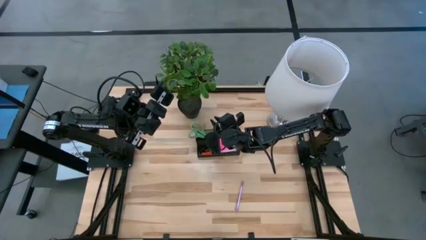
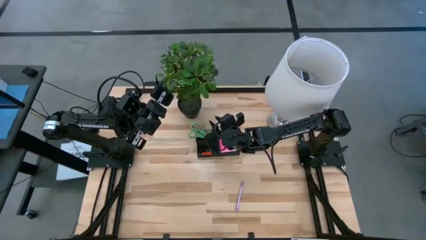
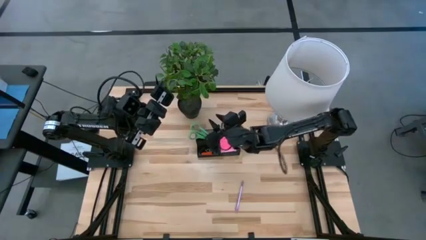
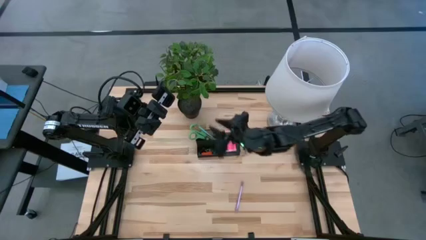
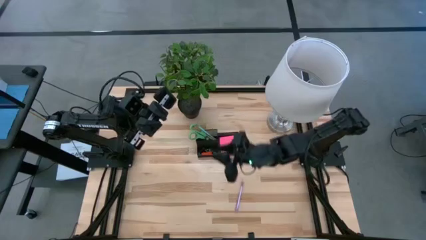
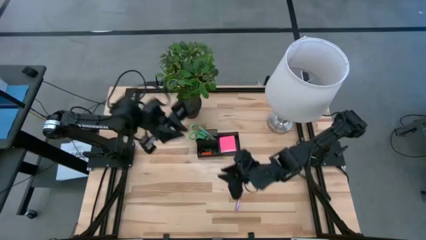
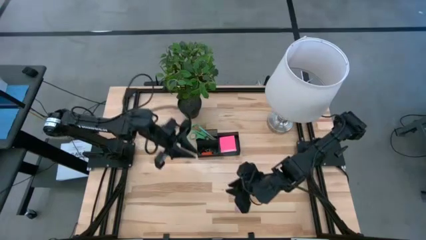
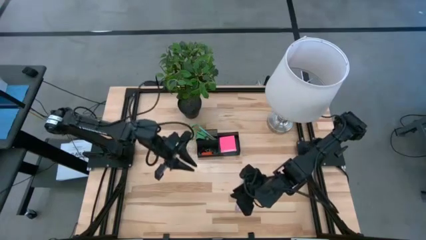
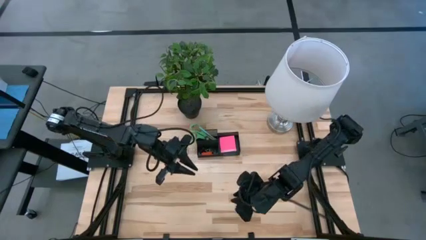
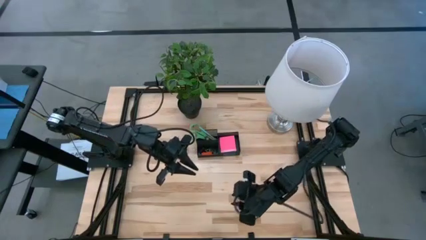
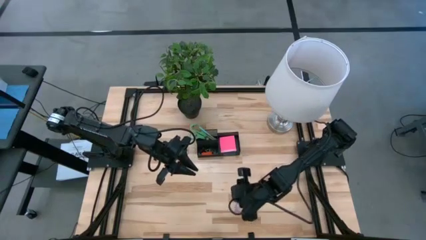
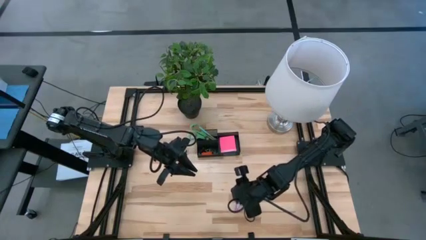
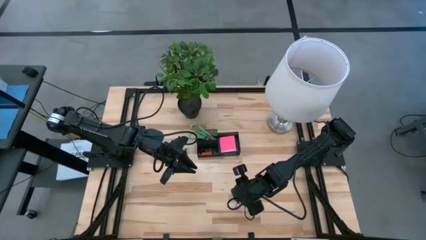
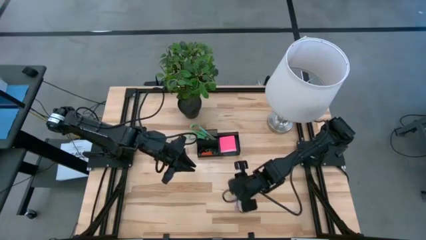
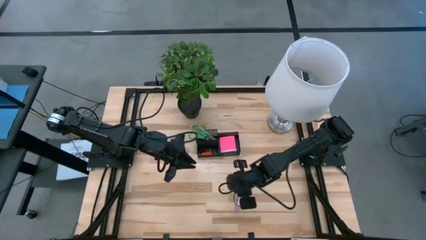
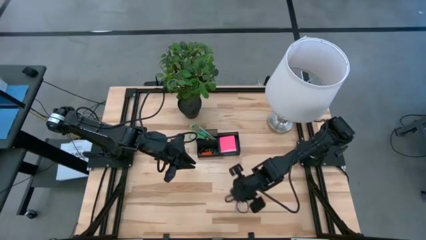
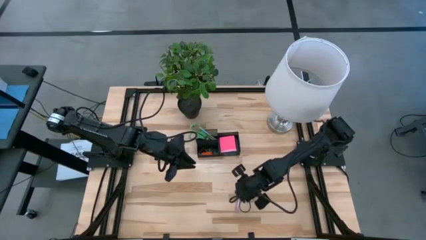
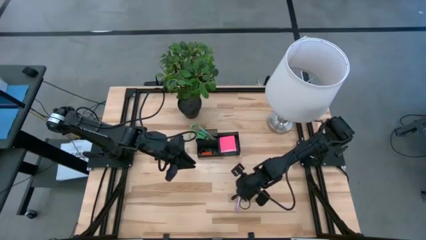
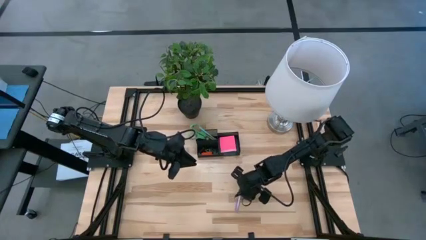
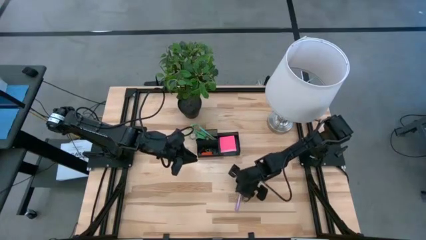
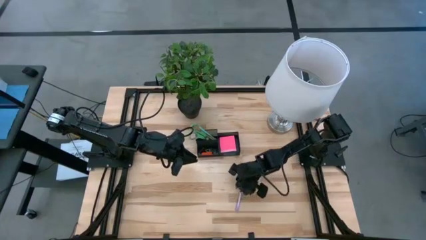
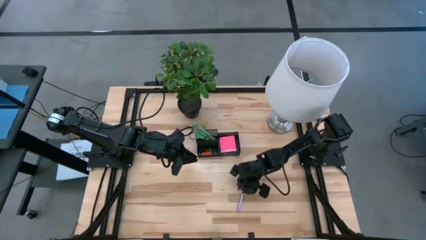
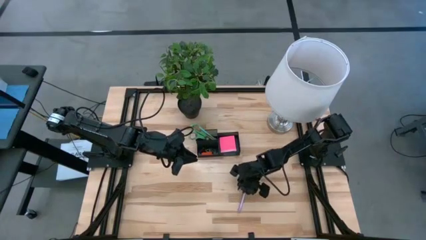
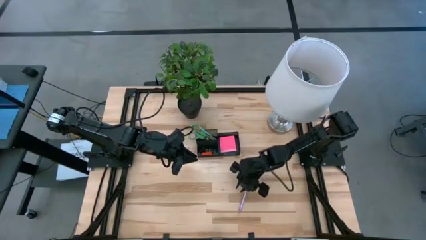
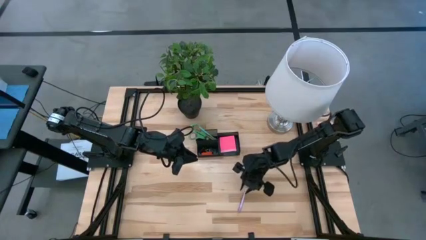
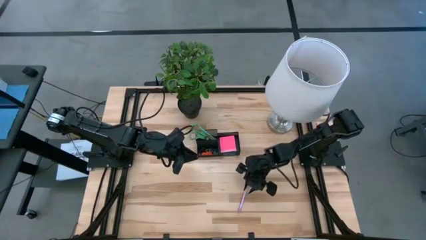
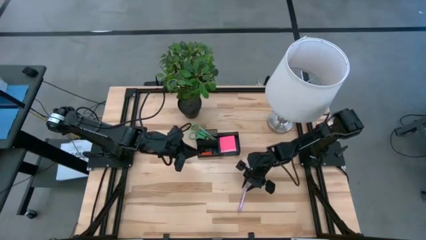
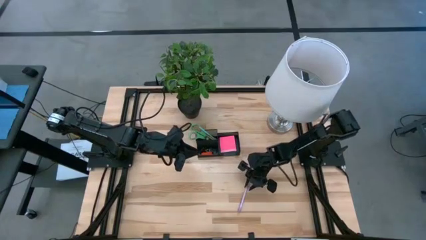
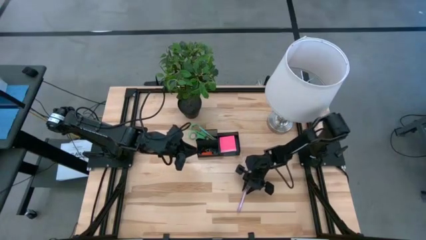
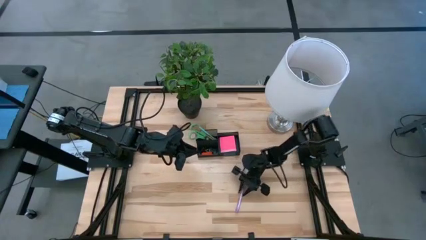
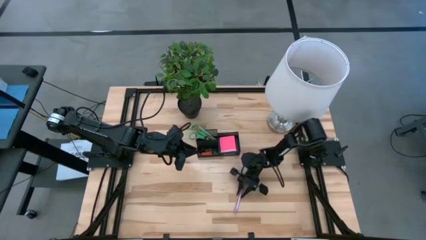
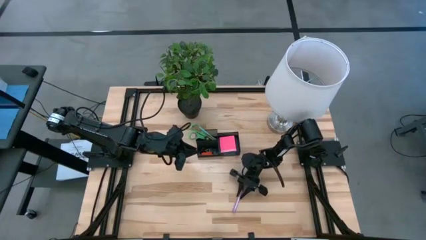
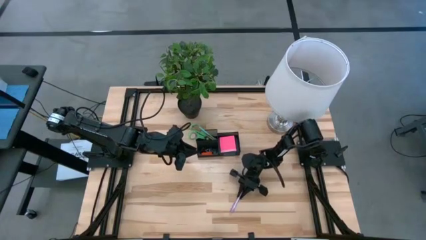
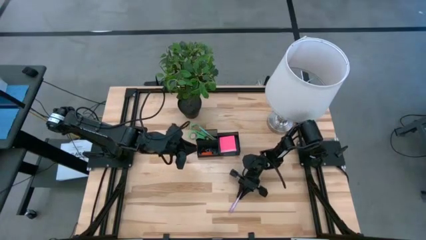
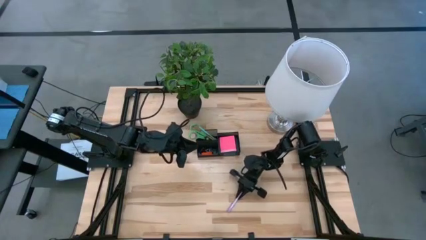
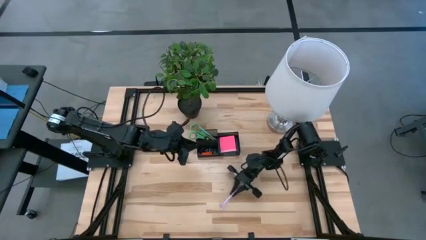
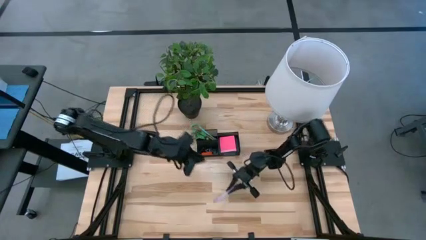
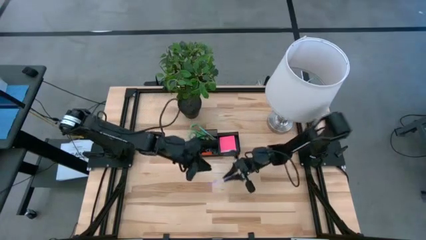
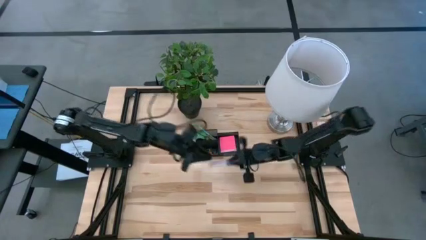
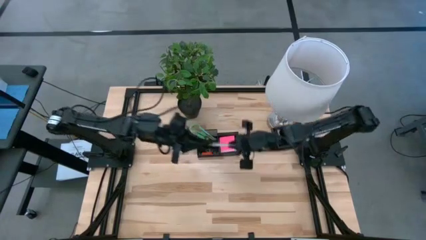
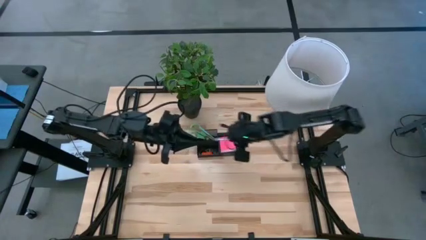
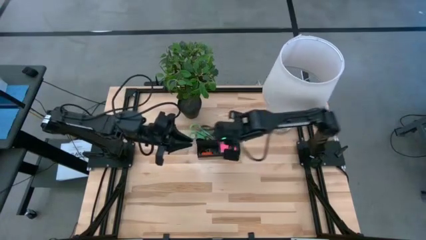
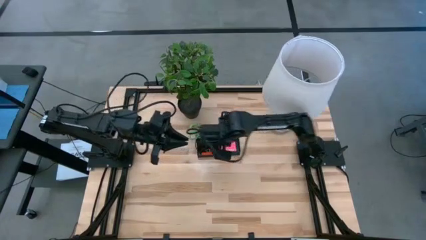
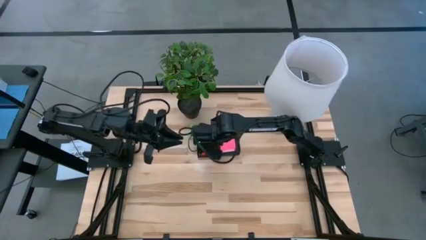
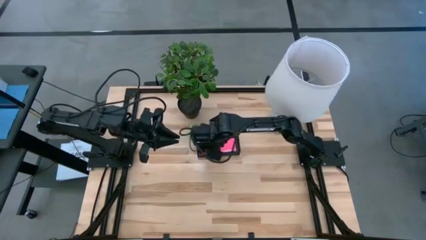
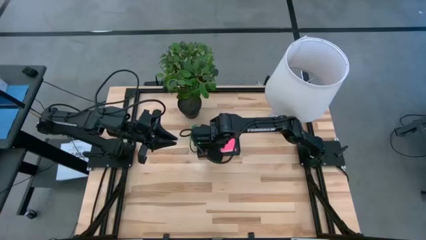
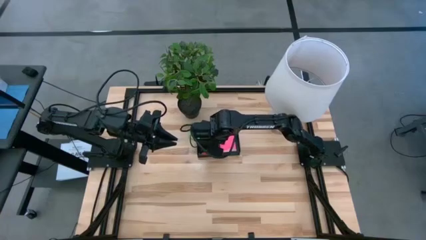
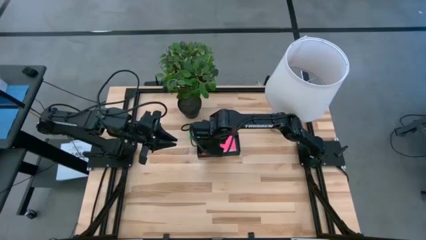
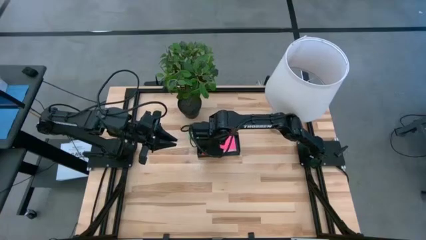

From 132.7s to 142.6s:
Task: Pick and place office supplies into organizer
Put the purple pen into the black desk organizer

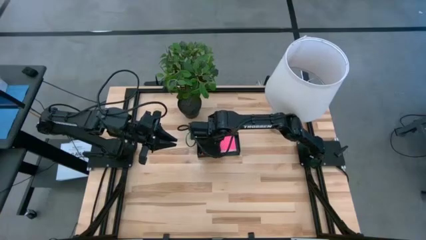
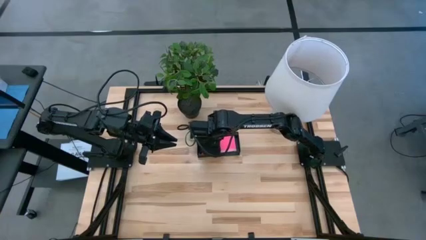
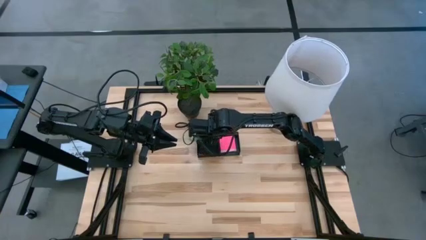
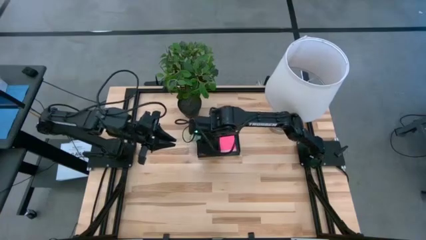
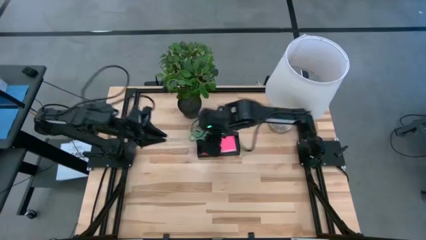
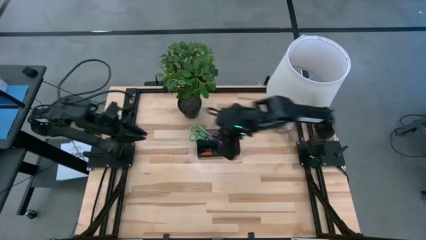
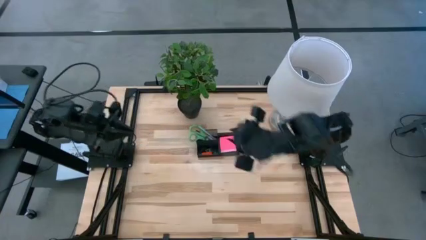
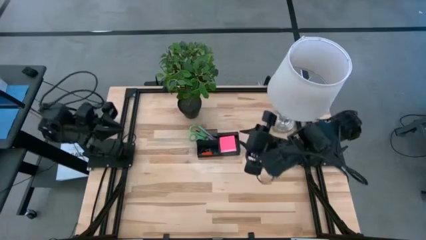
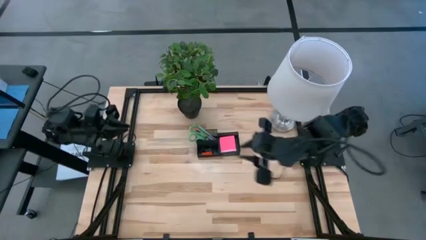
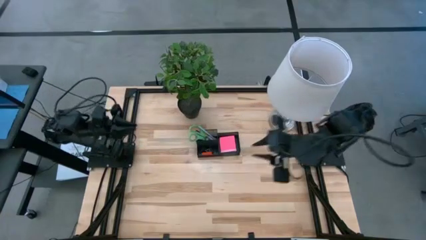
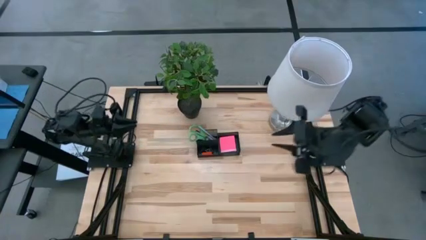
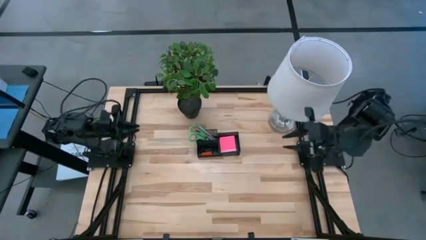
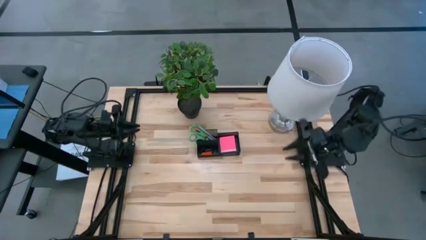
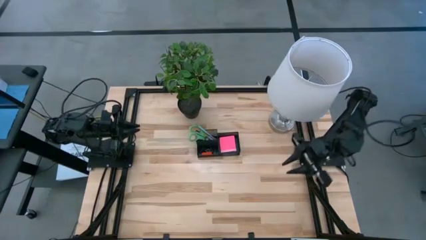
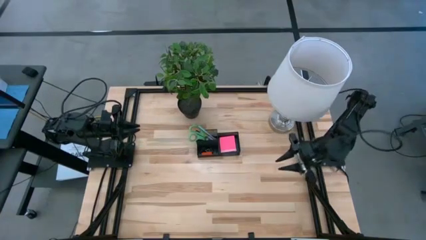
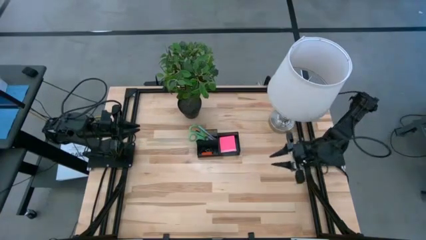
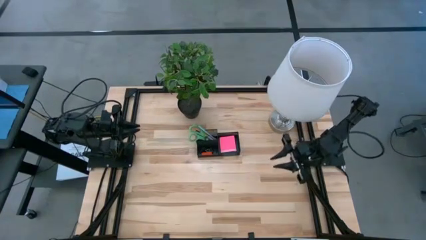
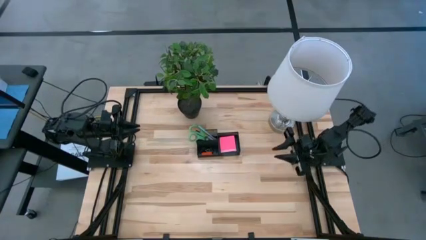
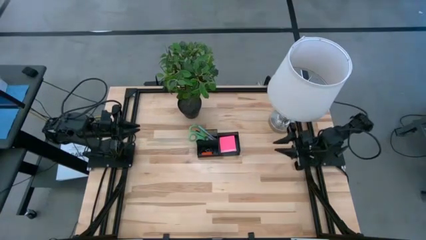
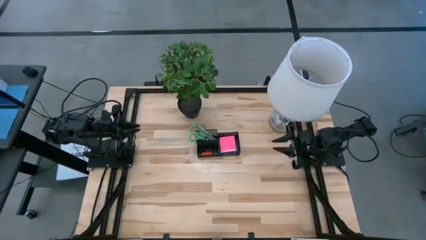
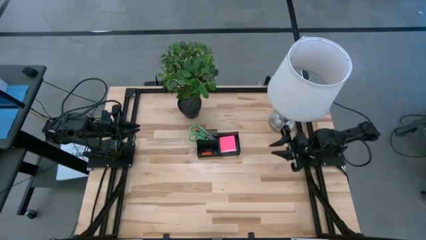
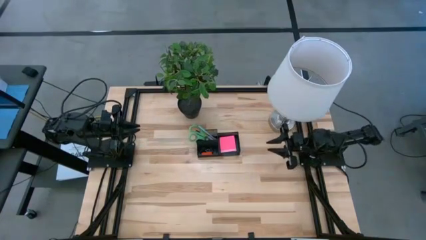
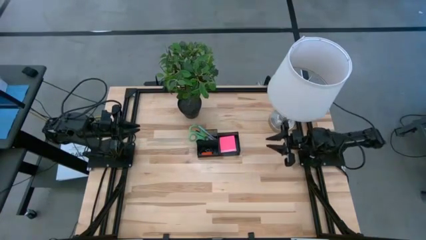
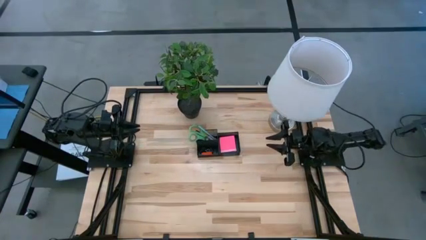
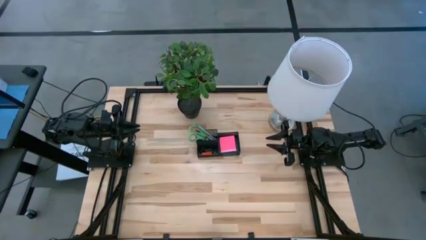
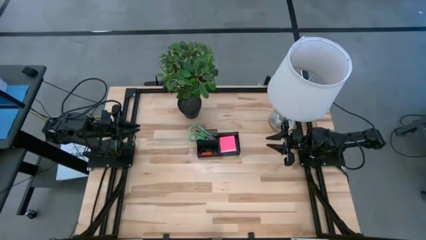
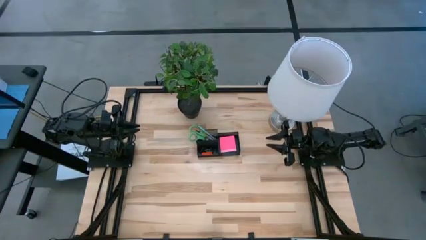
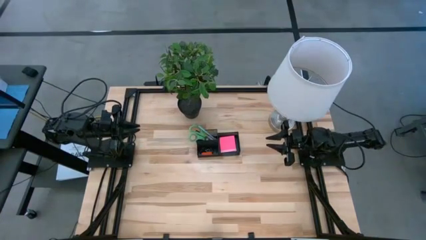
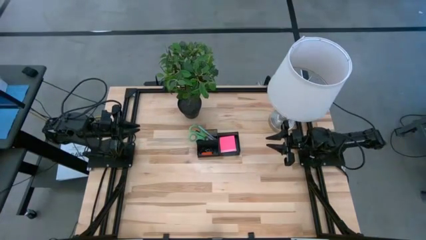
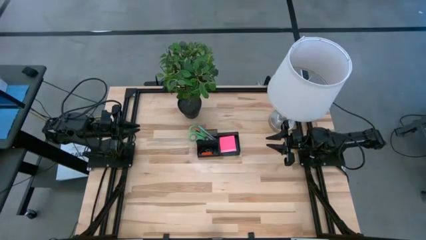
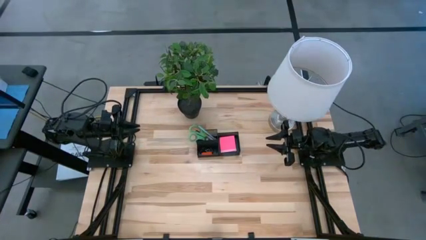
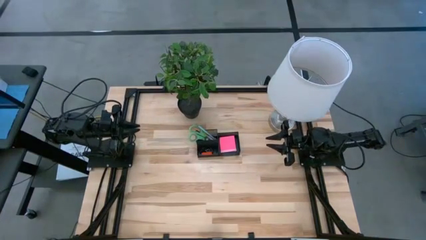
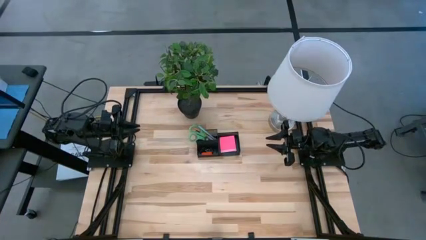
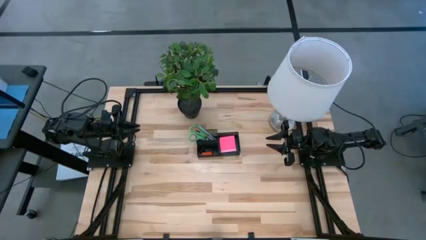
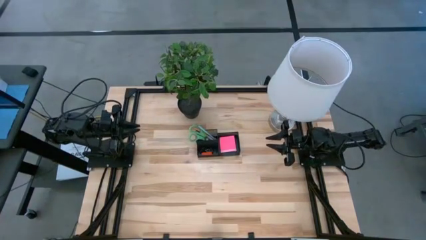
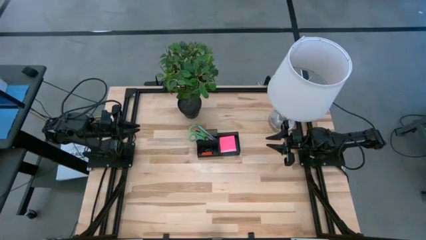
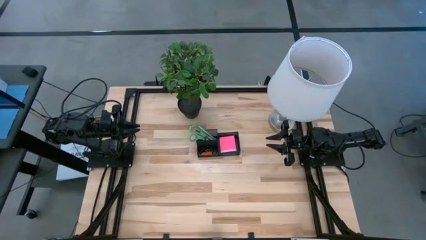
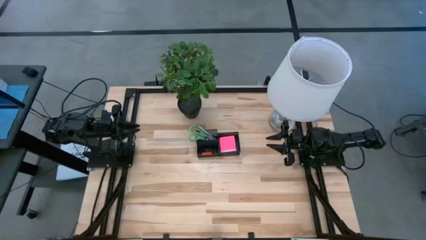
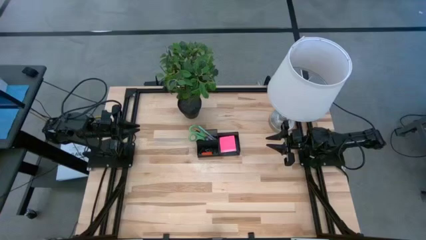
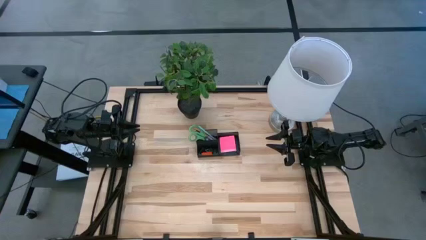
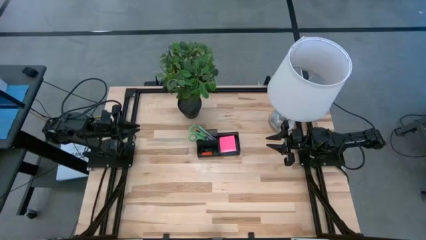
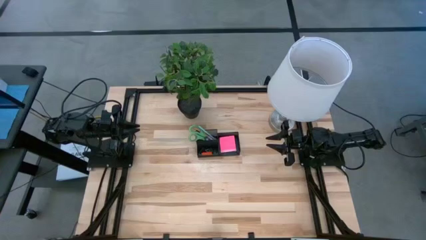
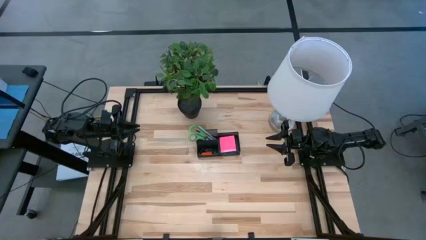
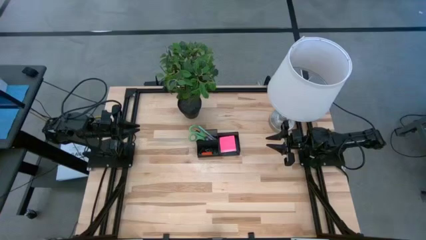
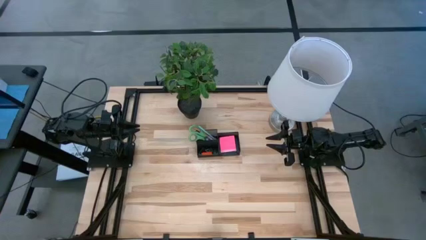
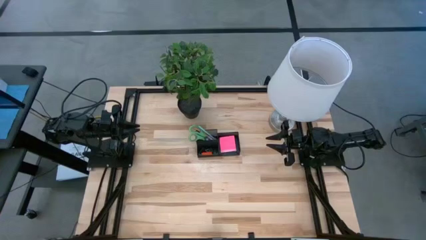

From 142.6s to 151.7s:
Return to Home Position
